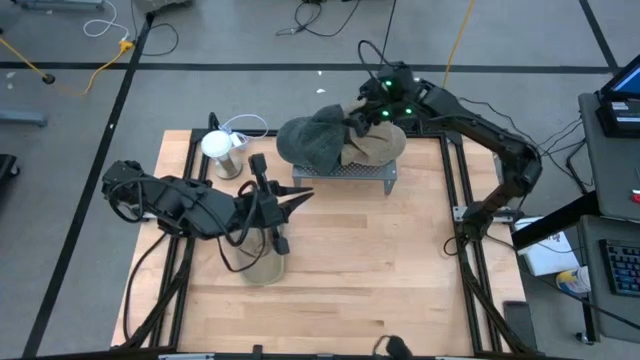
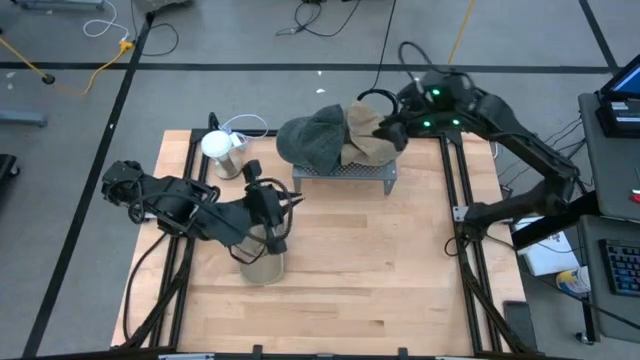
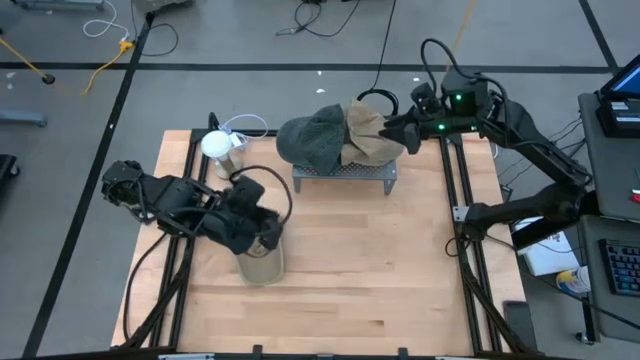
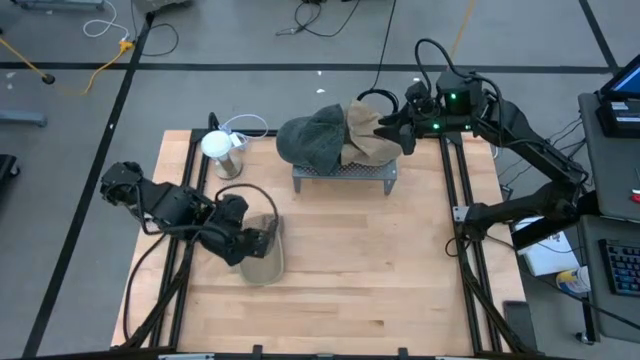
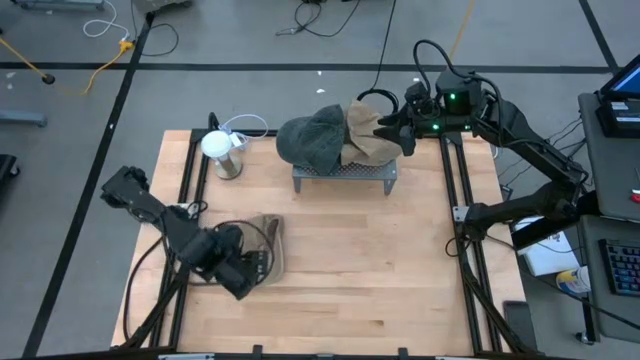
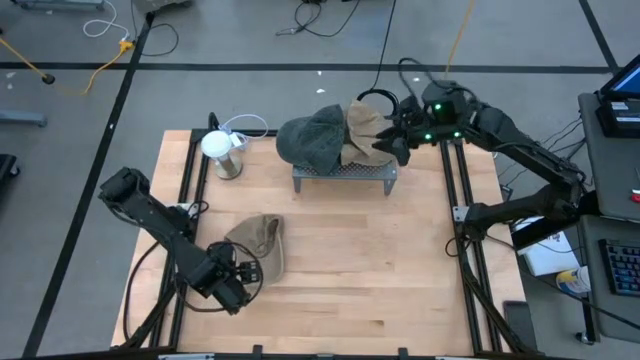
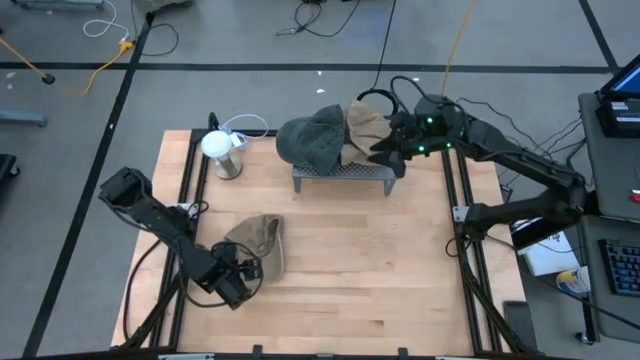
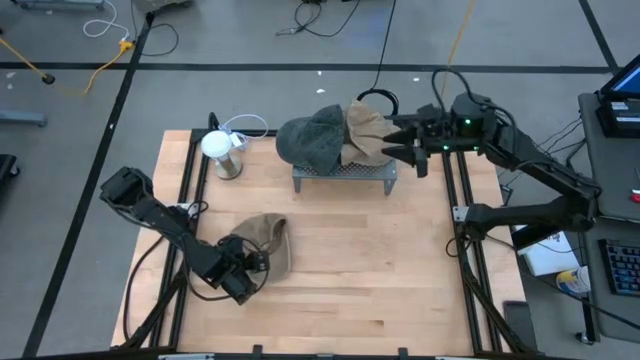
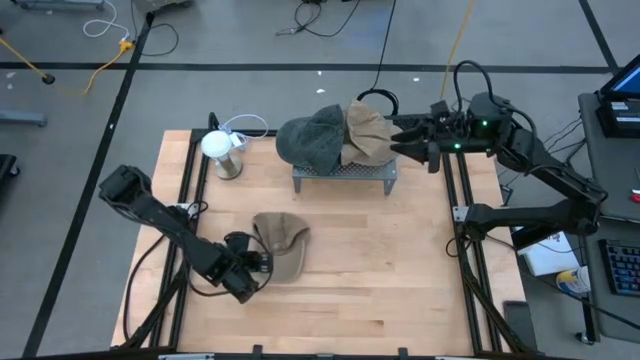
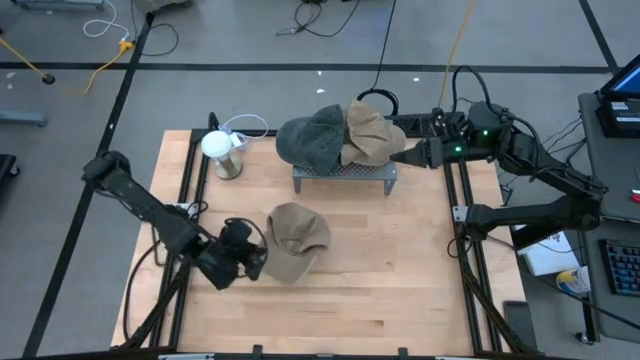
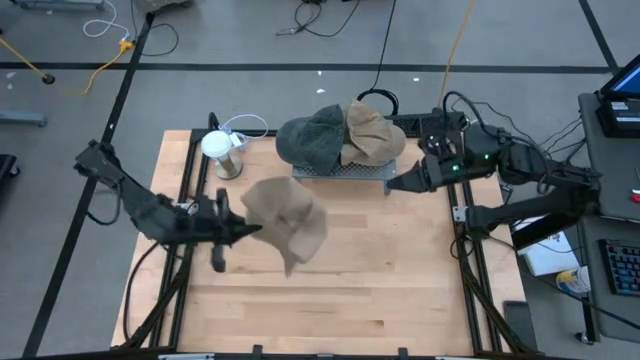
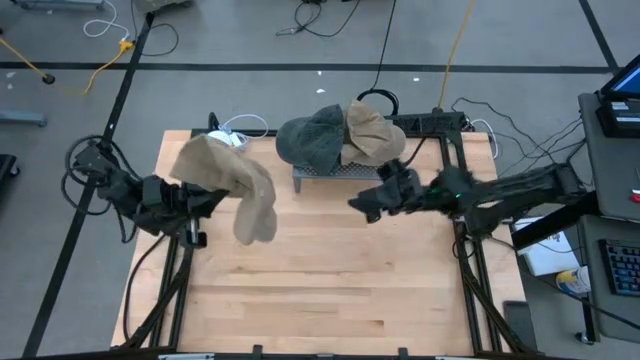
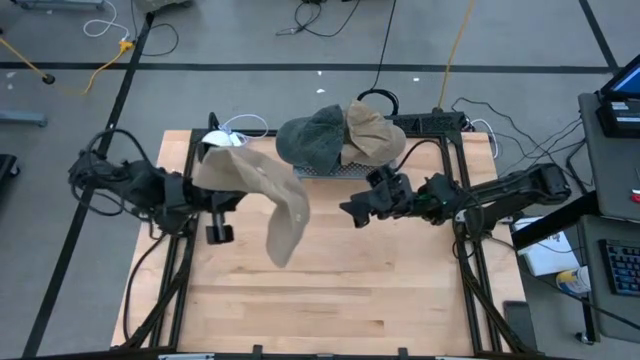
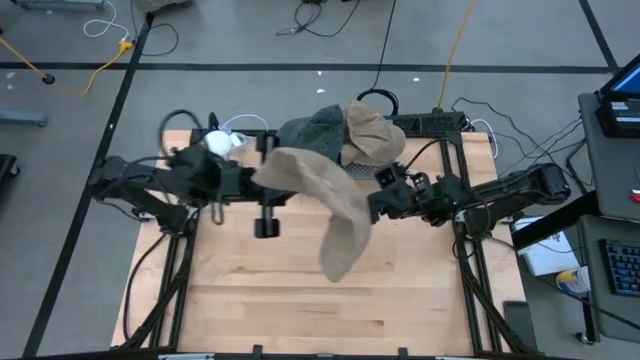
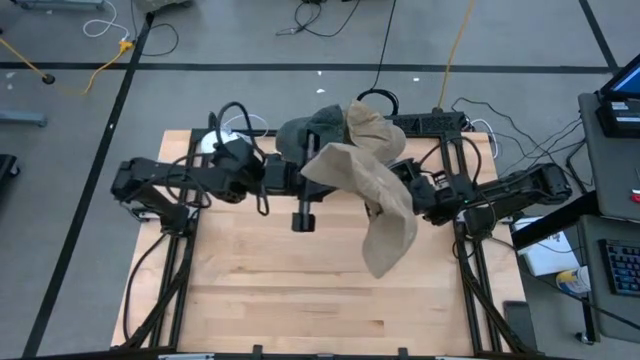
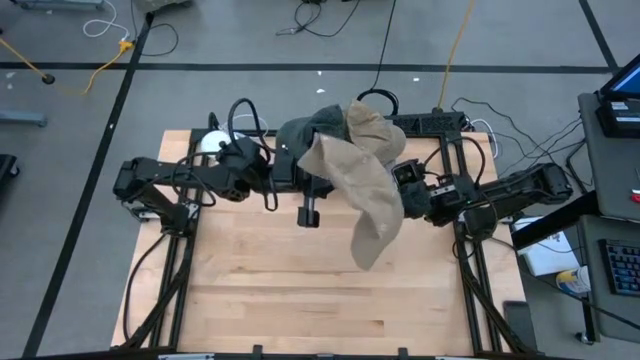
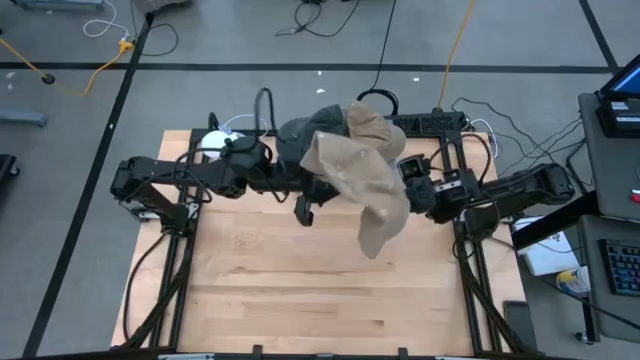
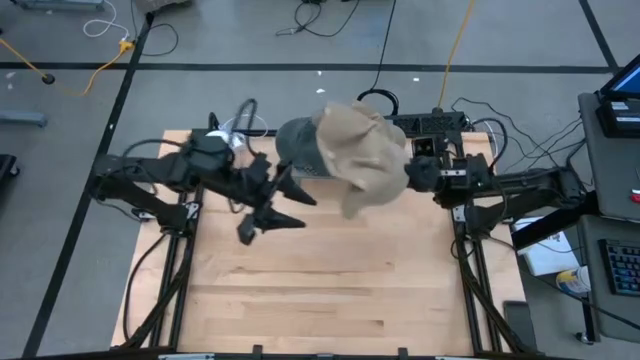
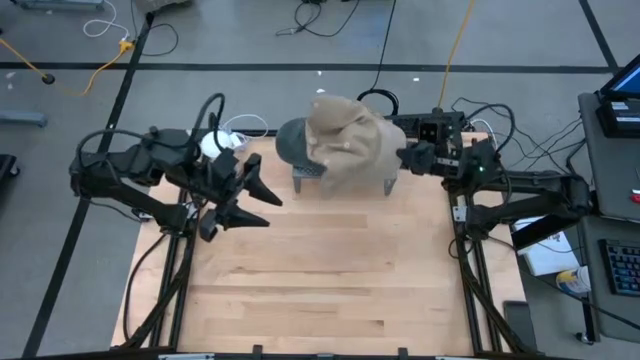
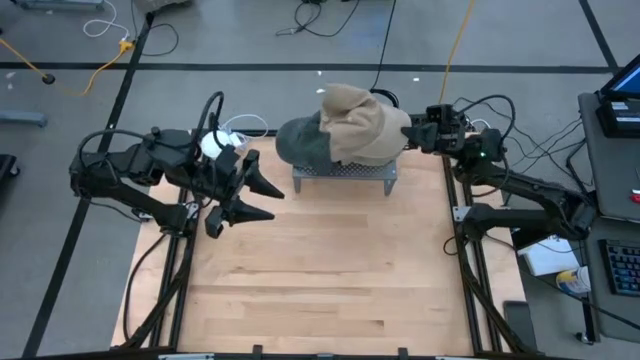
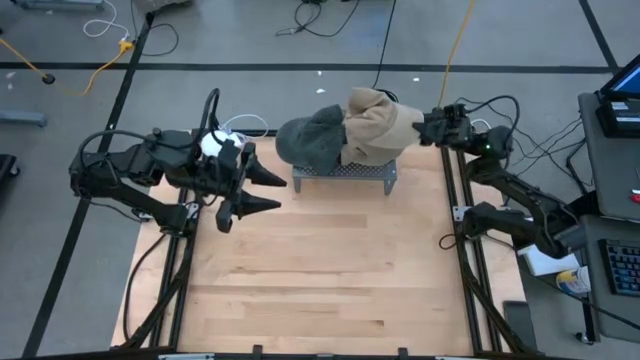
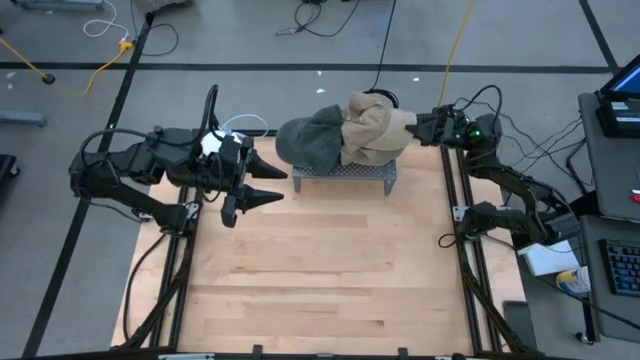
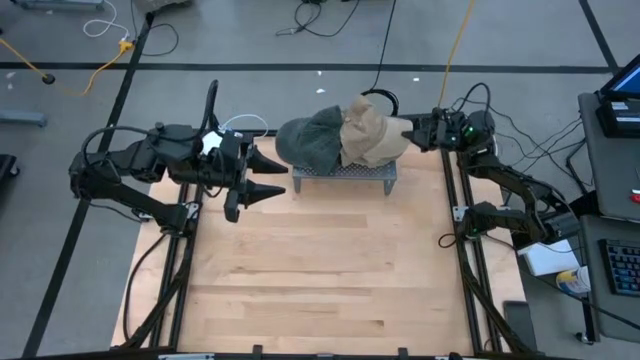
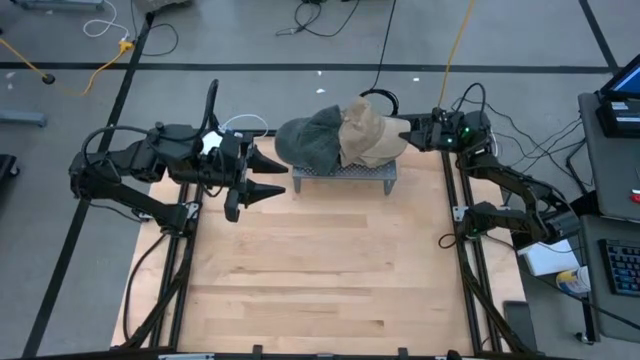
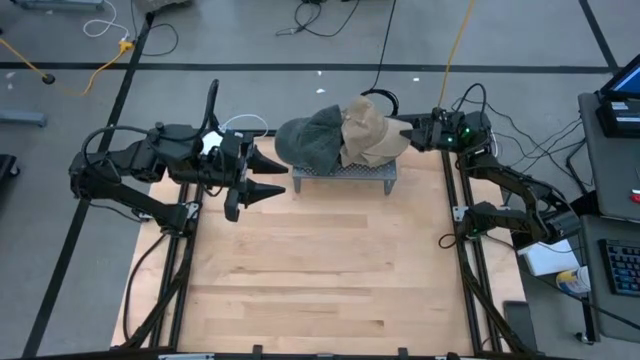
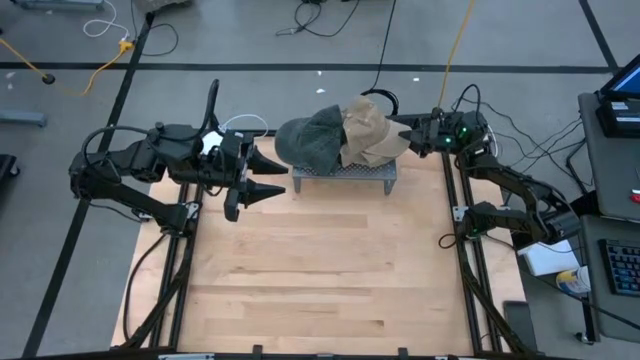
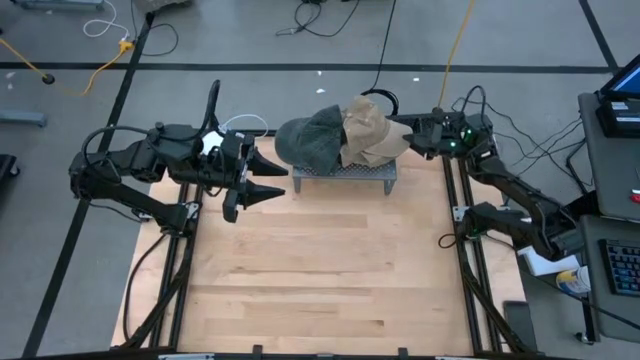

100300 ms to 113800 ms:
Task: Pick & Place hat
Stack the brown cap on top of the brown cap on the shelf

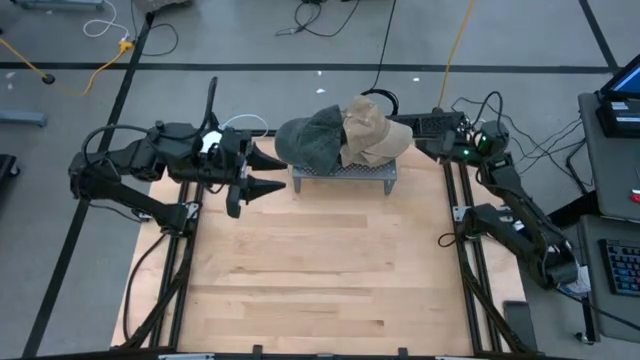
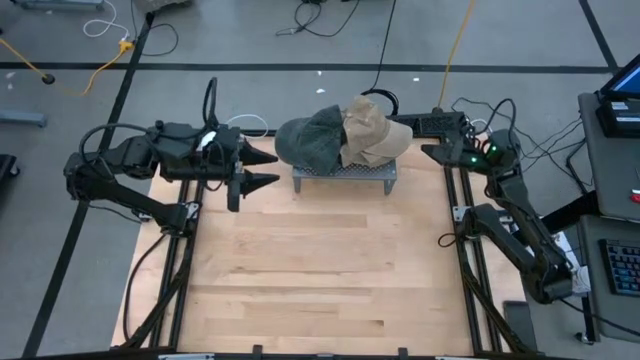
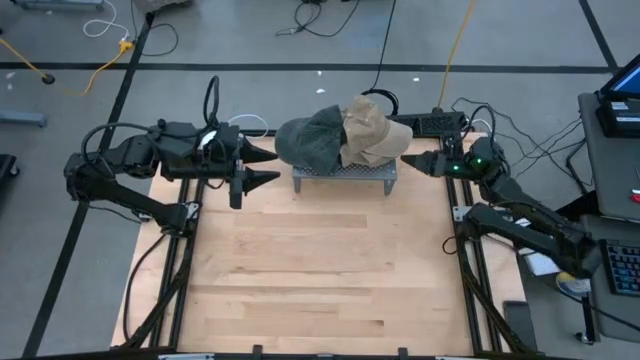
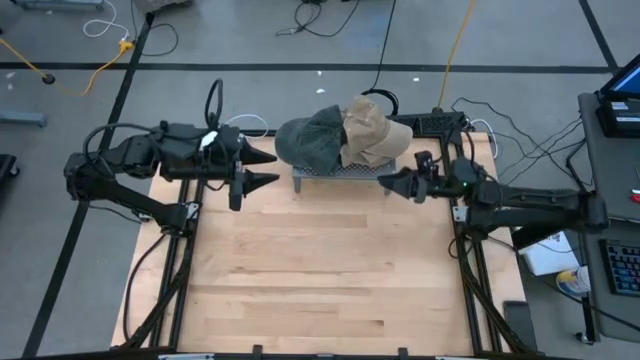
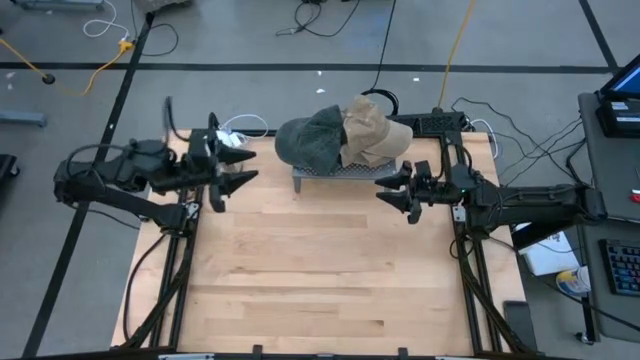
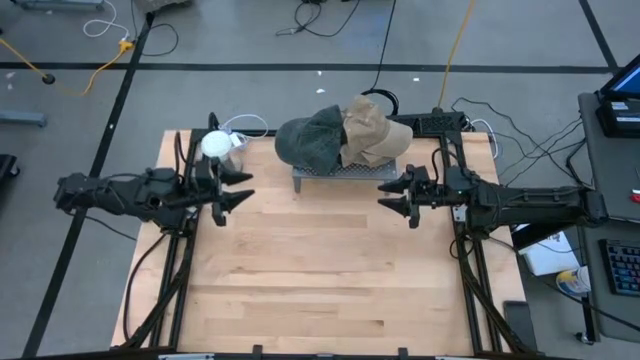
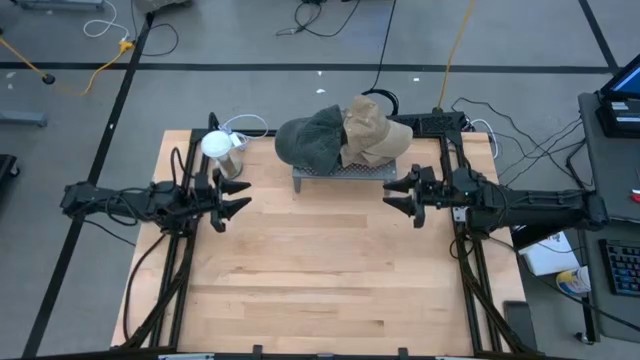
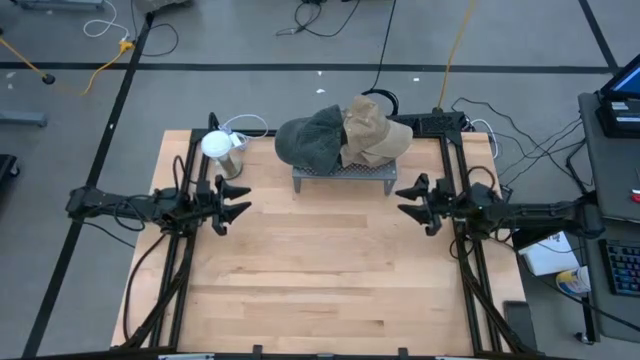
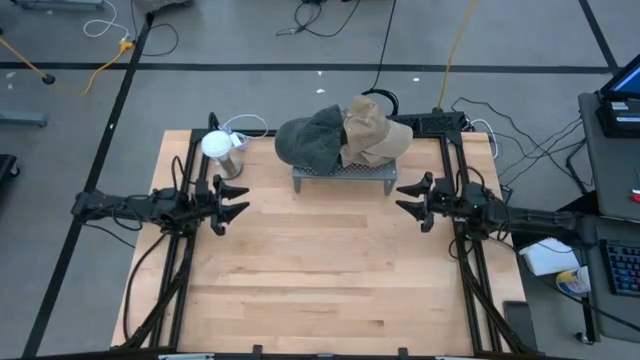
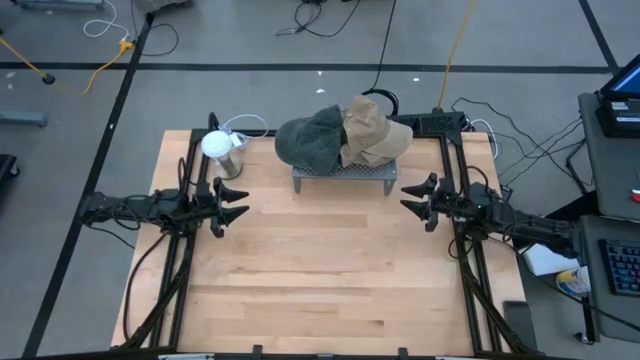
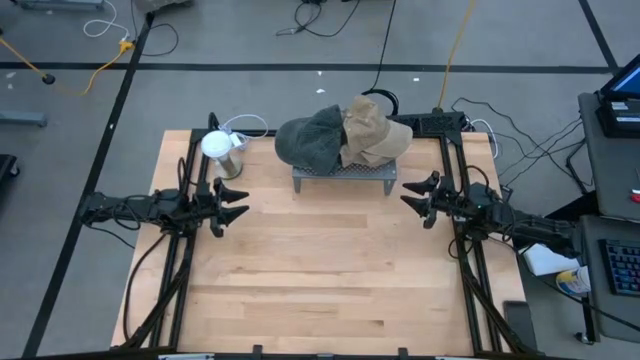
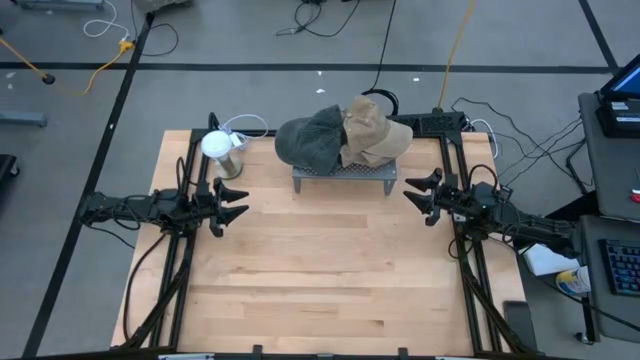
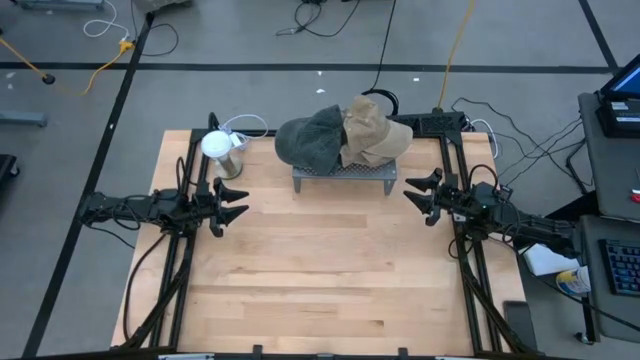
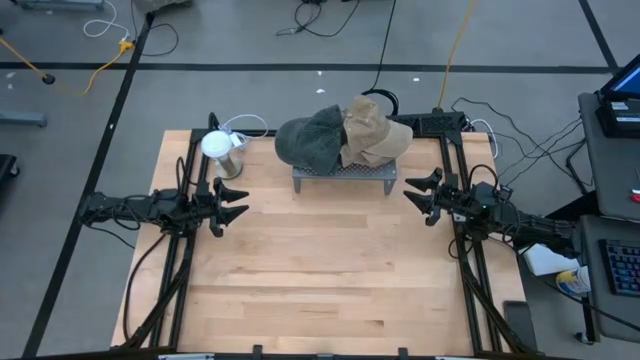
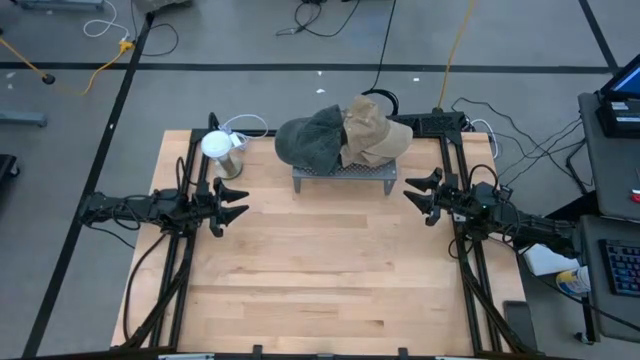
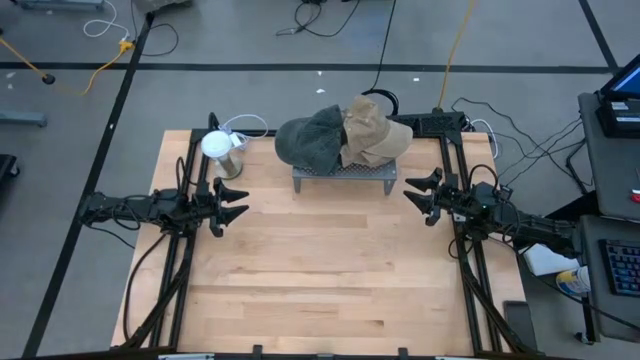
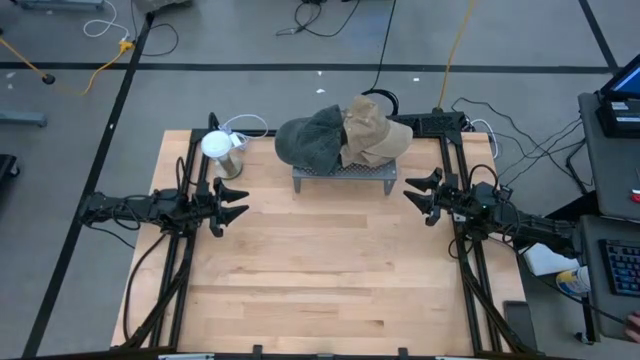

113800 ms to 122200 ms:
Return to Home Position
